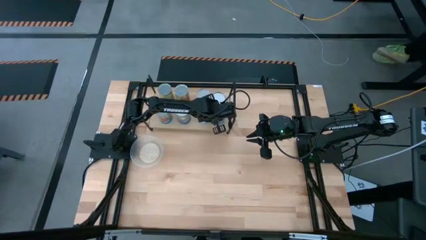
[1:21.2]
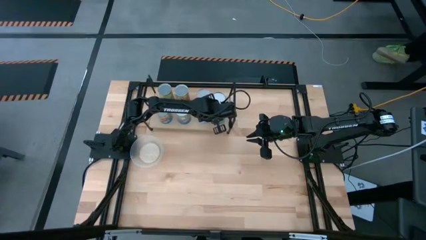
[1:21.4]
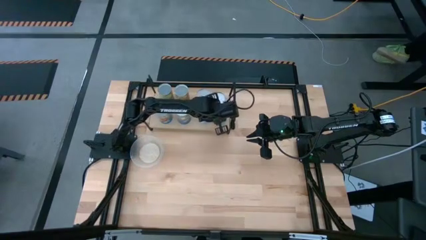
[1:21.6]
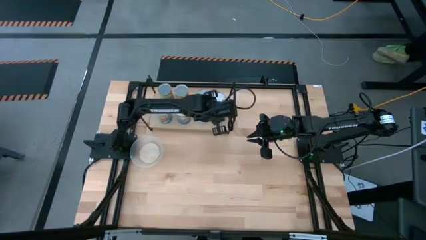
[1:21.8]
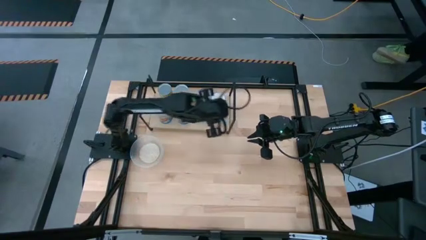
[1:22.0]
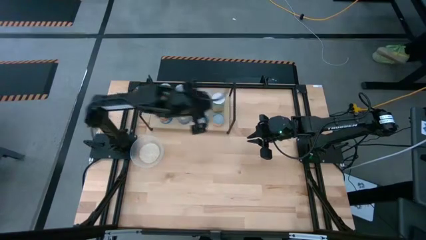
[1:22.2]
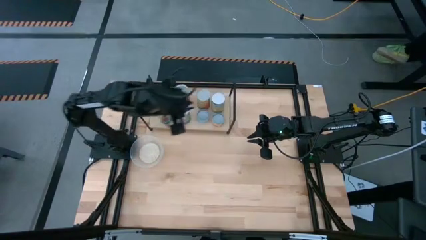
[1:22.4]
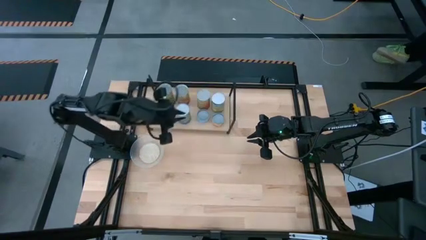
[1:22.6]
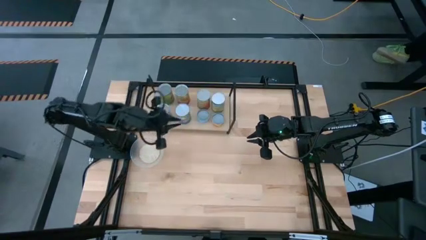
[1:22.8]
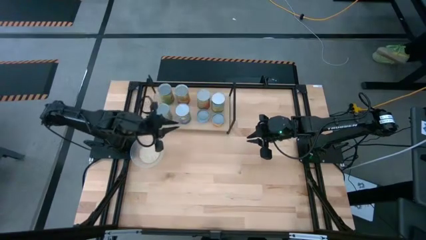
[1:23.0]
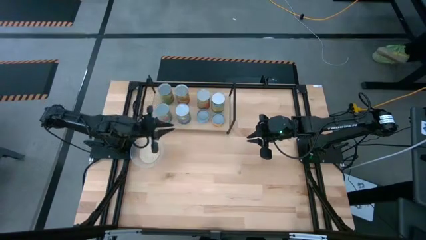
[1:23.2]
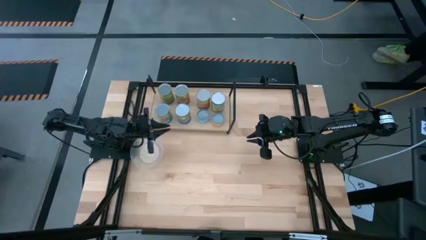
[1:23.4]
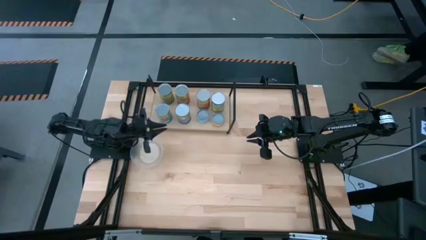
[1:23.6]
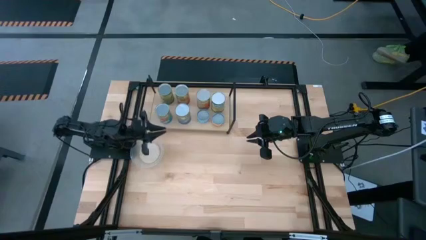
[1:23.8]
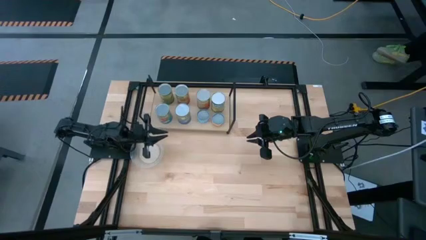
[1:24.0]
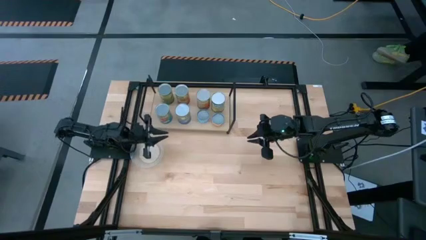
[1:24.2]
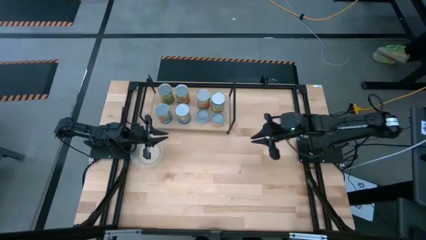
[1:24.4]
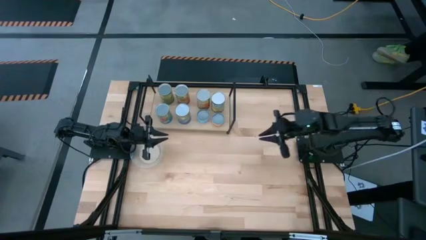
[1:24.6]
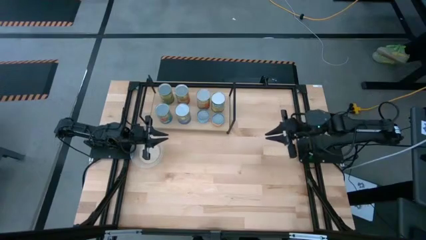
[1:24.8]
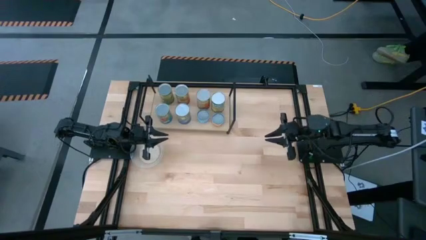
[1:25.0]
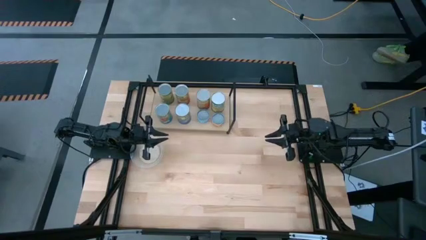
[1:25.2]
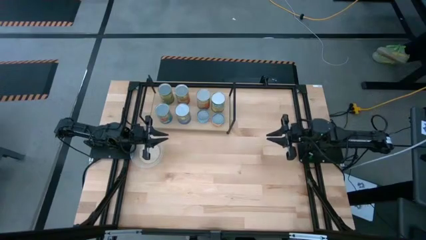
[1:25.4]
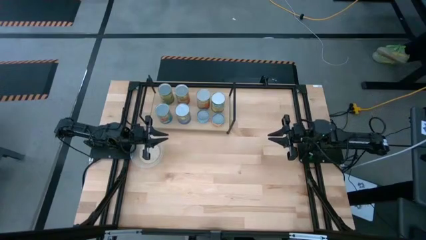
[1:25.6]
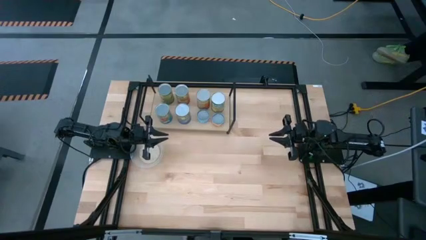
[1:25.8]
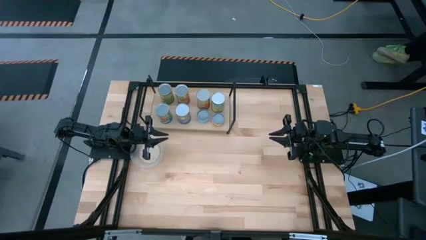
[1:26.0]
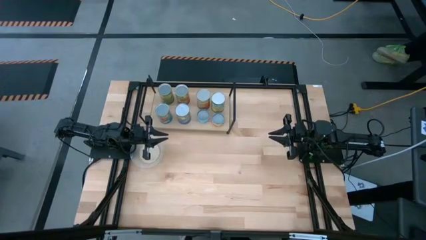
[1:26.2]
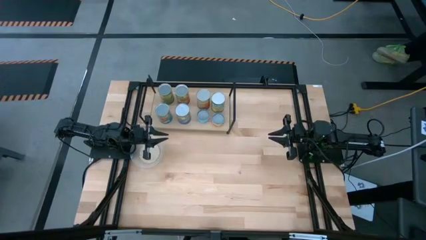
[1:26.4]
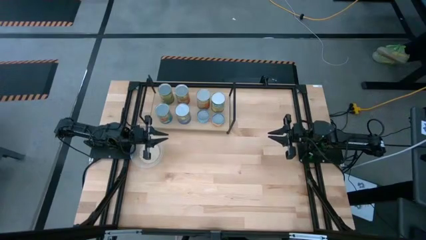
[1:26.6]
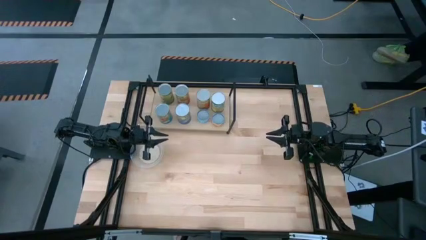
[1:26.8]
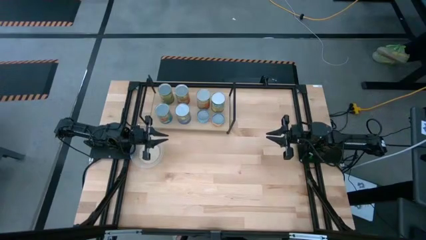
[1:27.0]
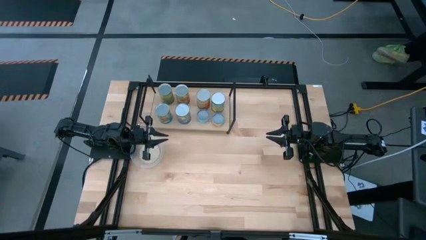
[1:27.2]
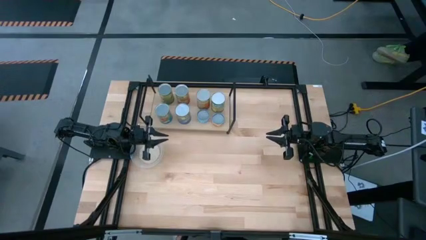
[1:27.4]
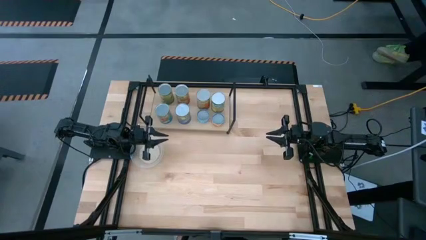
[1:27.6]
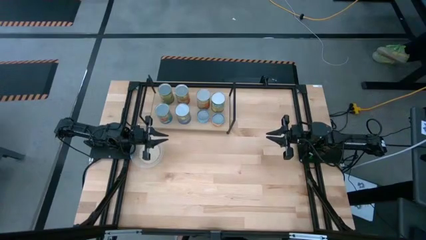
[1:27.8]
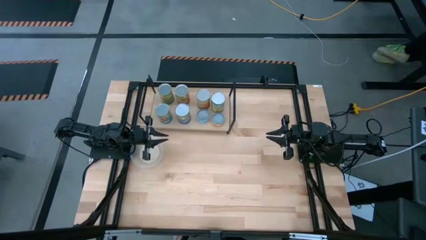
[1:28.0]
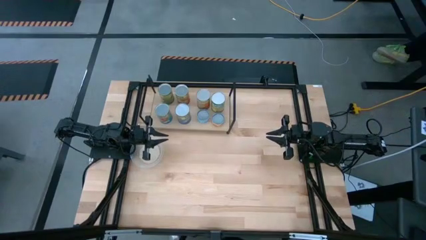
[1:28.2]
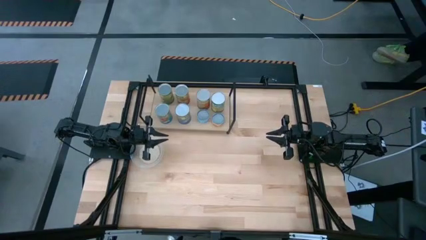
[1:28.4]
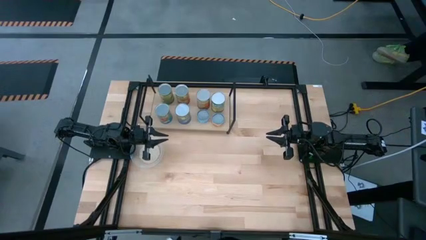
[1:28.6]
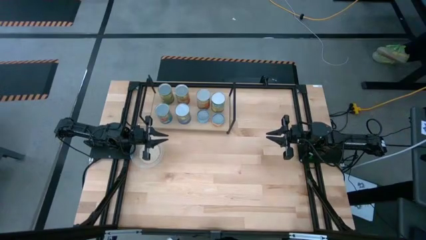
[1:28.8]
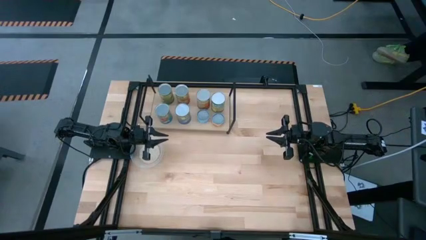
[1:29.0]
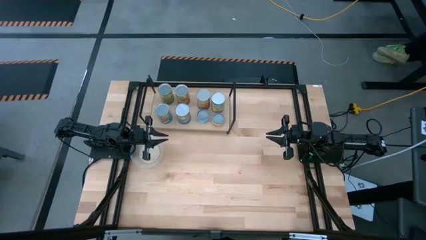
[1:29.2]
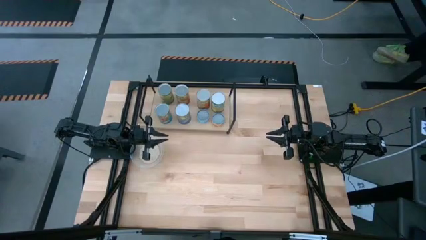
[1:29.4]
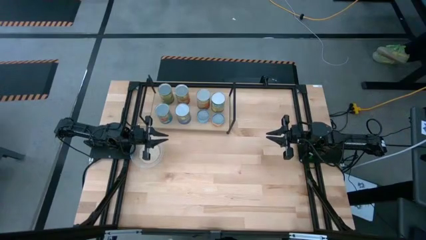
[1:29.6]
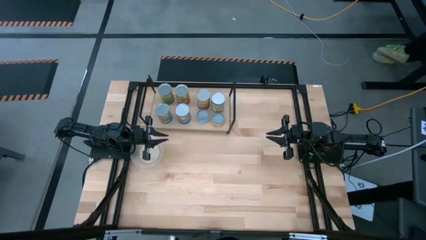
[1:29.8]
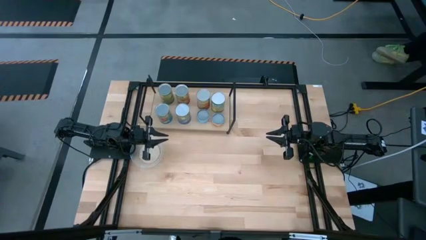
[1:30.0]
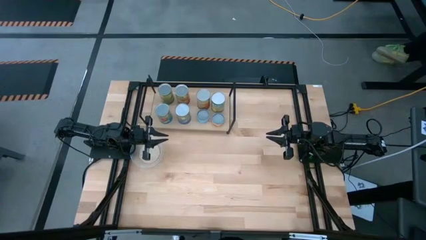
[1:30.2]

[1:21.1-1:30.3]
Task: Pick and place cans onto a shelf
Return to Home Position
